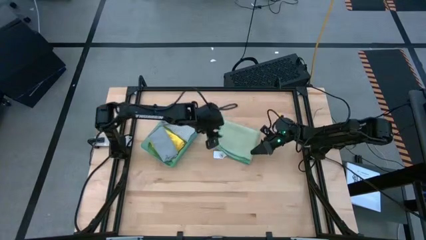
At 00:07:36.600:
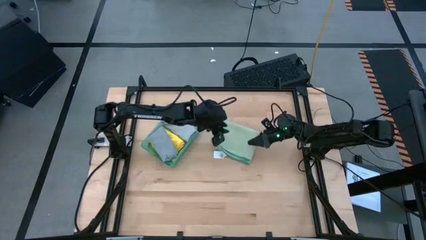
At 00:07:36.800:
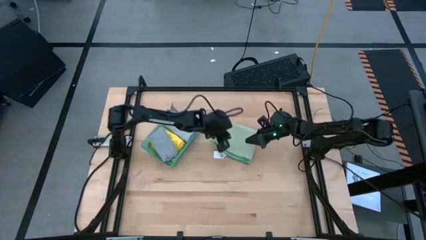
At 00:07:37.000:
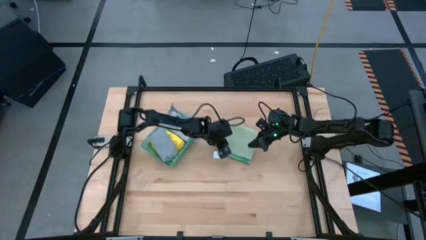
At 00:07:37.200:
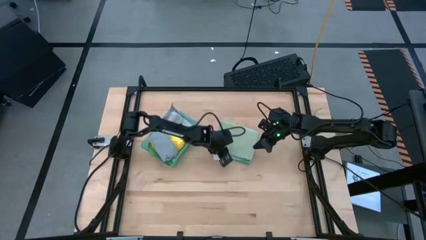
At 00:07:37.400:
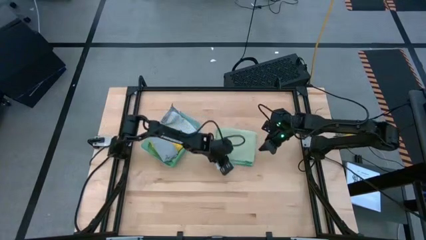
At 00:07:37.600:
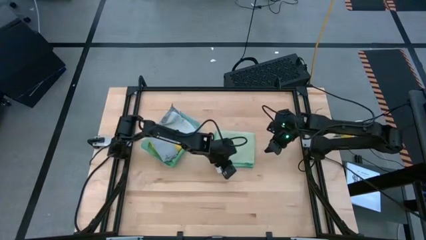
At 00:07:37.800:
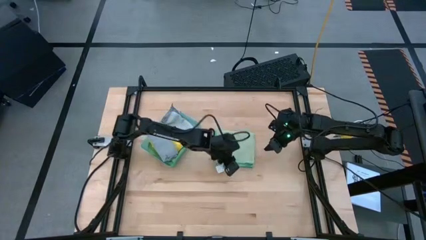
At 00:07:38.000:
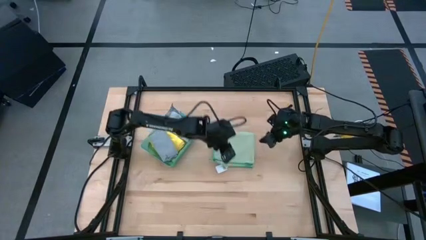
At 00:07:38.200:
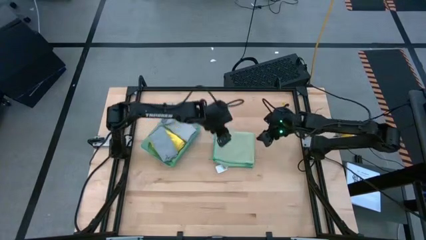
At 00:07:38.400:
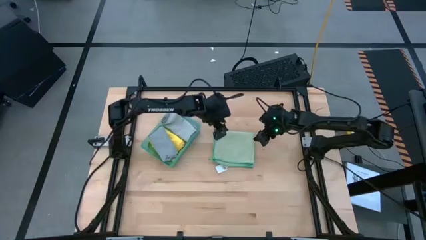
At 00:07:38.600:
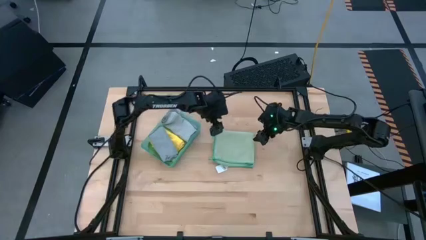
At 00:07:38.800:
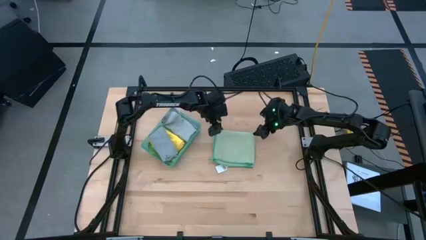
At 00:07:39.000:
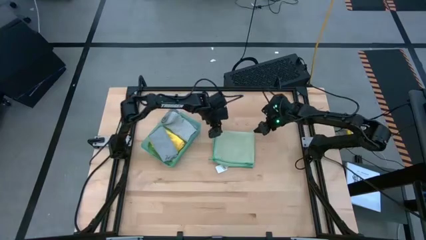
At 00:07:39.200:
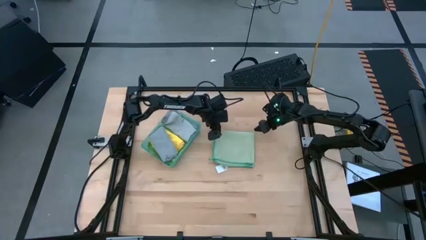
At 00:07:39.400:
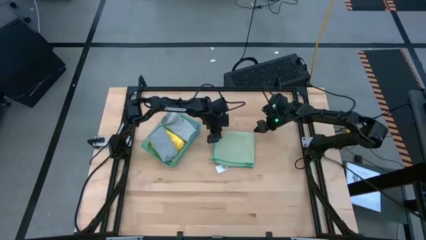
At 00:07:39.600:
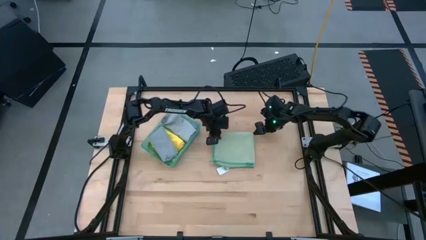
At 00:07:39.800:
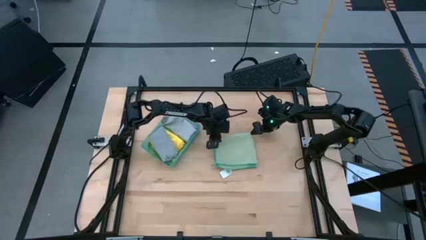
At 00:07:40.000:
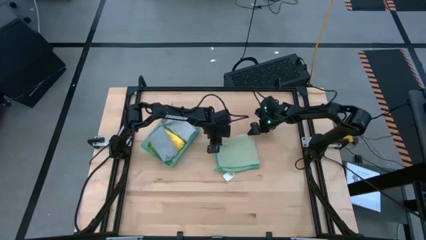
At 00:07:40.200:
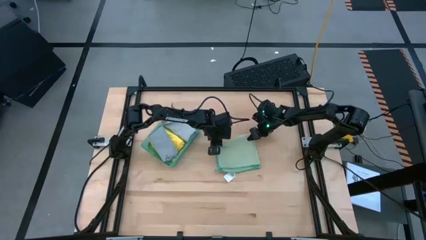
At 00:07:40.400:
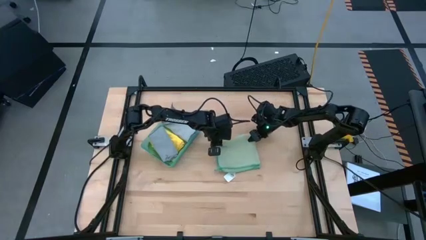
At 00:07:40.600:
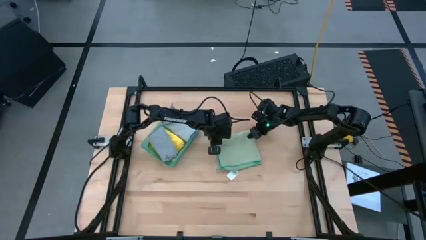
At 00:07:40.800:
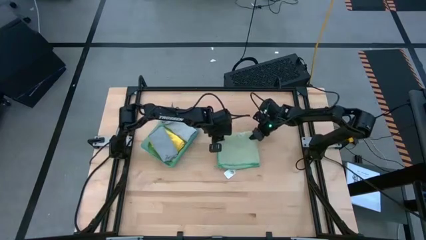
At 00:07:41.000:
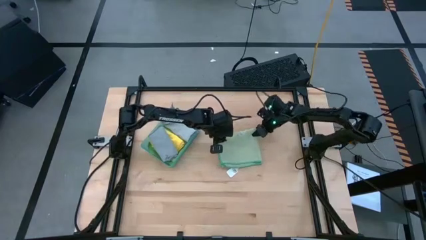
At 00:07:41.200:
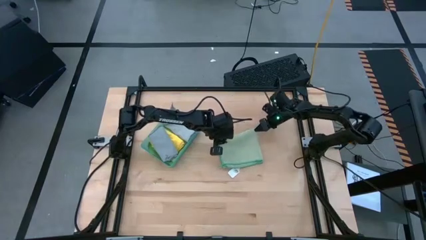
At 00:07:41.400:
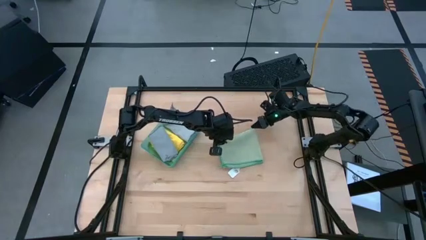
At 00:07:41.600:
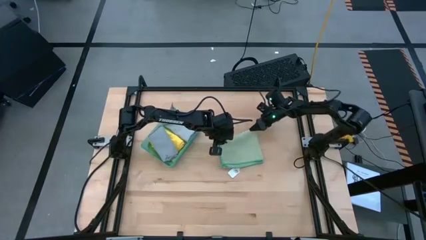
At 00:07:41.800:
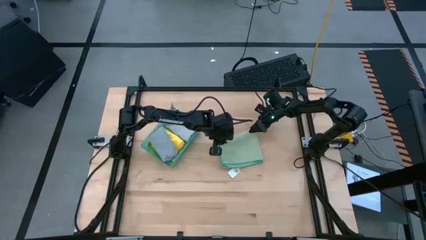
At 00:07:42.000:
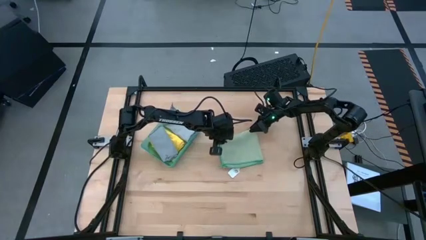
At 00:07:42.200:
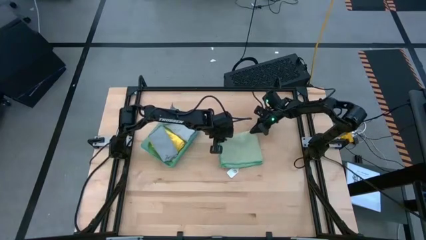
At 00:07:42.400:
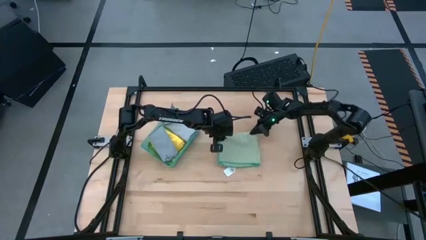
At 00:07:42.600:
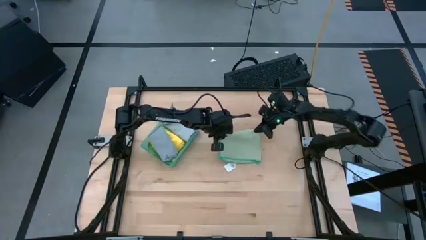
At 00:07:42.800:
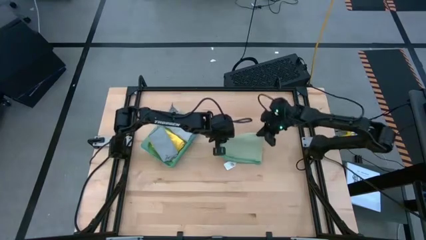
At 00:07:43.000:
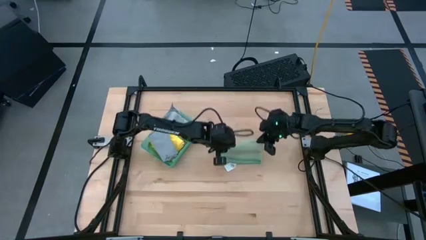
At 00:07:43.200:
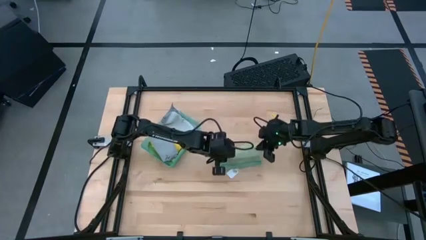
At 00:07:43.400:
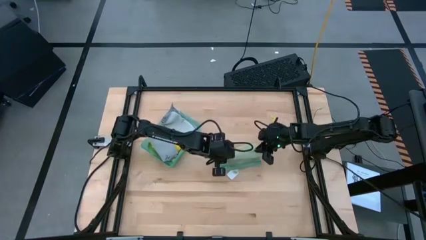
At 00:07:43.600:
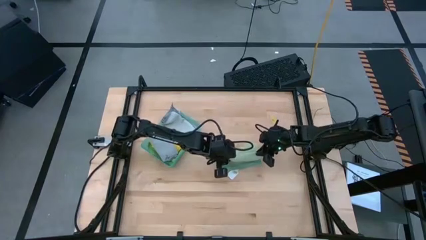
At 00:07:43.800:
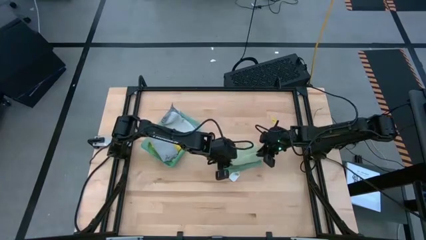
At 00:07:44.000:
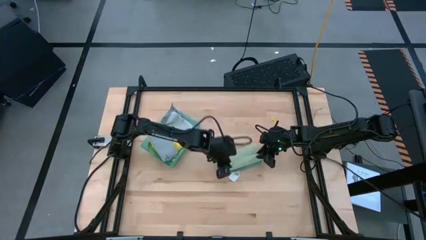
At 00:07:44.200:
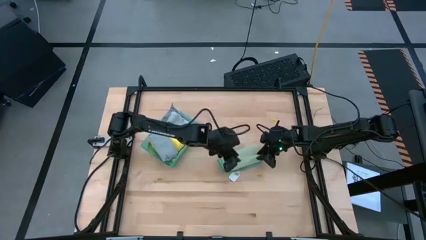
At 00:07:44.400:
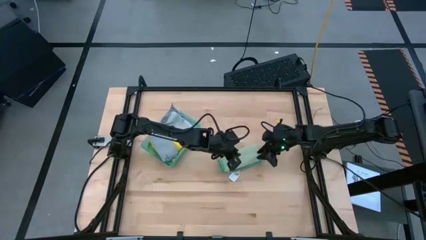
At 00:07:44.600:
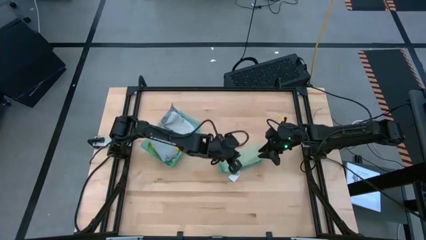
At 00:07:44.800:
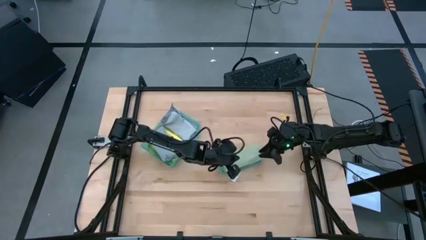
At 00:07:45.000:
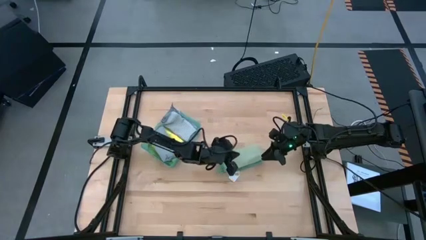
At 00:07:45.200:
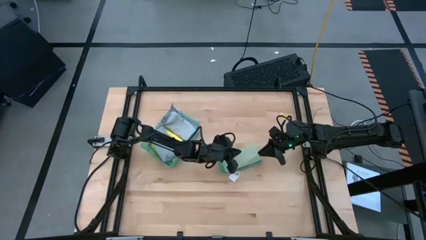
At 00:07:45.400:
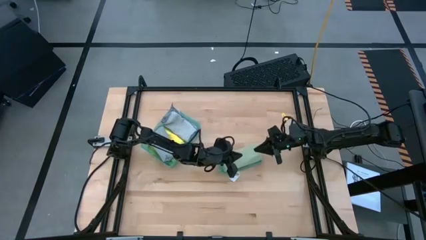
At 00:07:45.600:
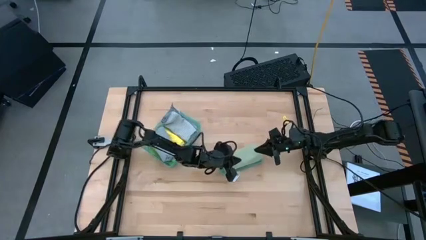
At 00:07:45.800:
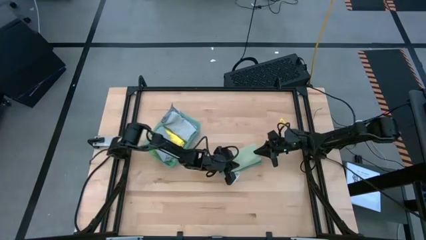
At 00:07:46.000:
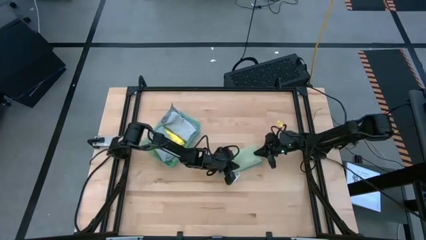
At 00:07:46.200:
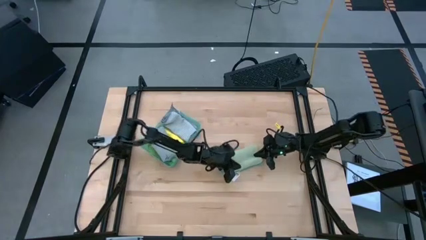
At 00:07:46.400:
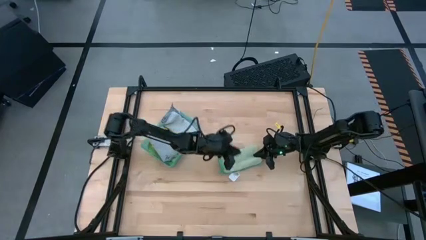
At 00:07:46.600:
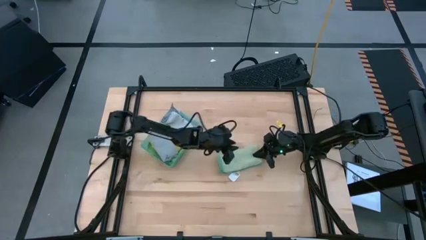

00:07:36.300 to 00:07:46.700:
Task: Fold microfiber towels
Fold the light green microfiber cloth

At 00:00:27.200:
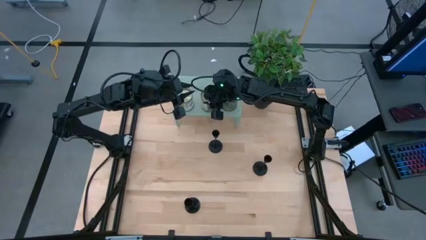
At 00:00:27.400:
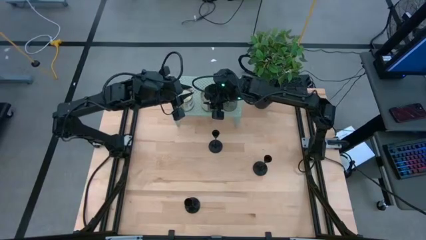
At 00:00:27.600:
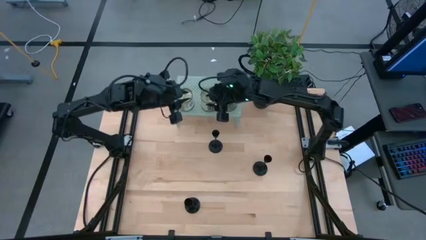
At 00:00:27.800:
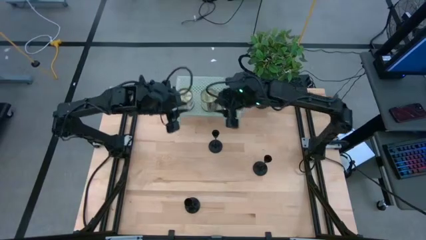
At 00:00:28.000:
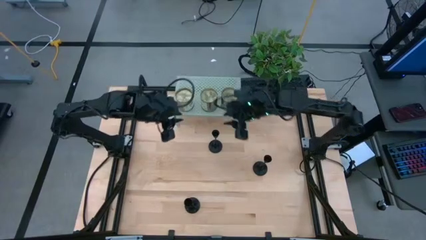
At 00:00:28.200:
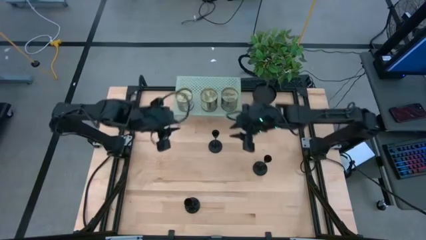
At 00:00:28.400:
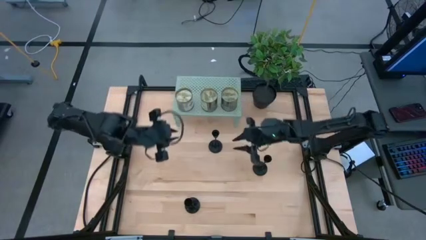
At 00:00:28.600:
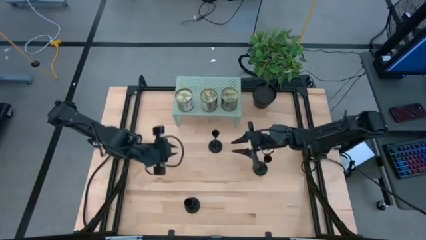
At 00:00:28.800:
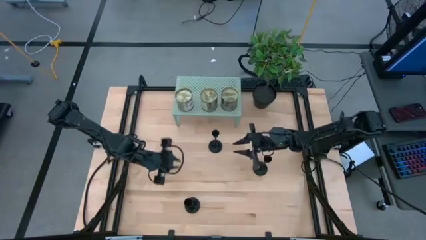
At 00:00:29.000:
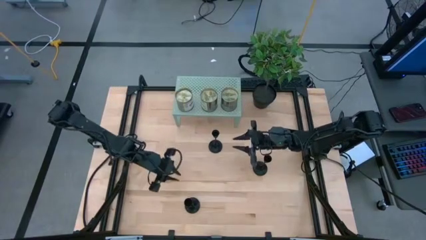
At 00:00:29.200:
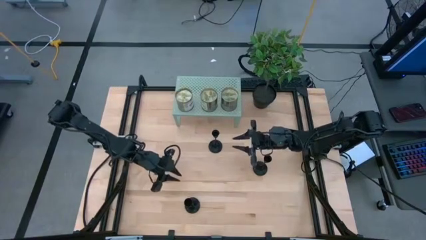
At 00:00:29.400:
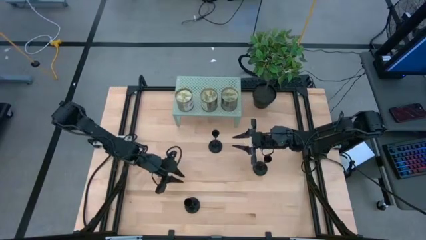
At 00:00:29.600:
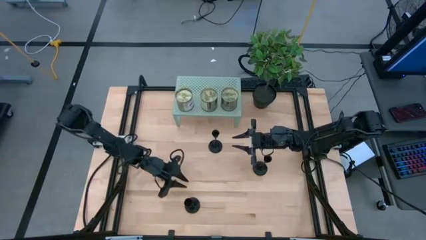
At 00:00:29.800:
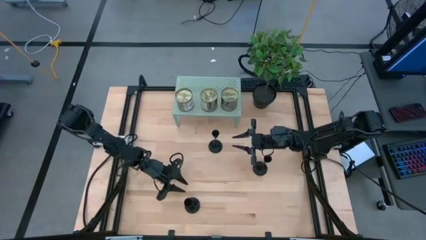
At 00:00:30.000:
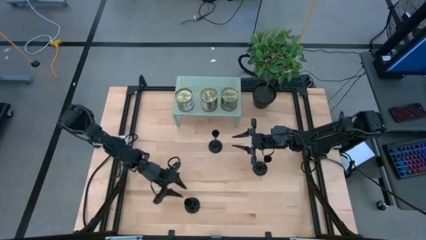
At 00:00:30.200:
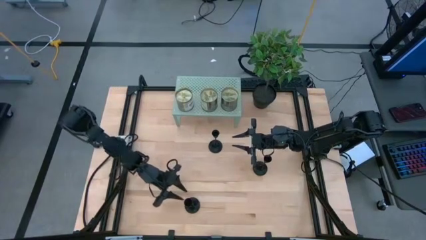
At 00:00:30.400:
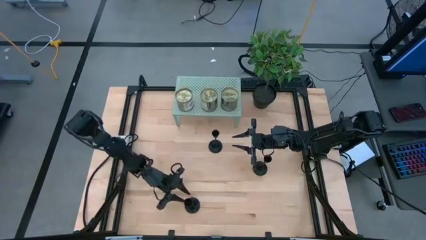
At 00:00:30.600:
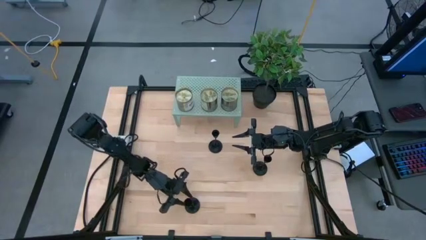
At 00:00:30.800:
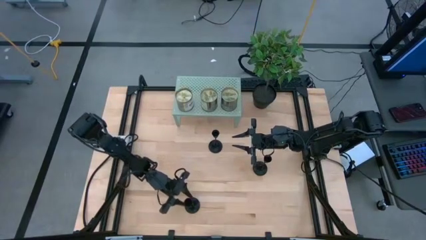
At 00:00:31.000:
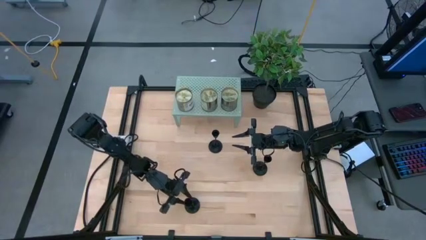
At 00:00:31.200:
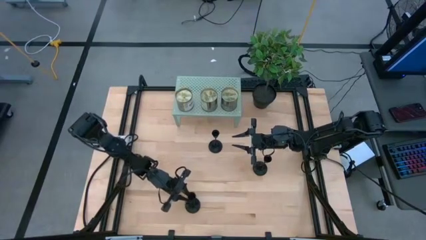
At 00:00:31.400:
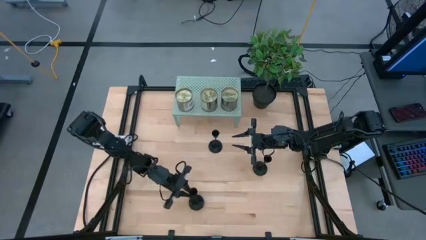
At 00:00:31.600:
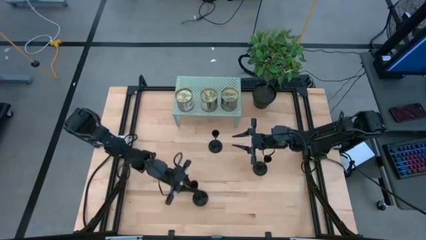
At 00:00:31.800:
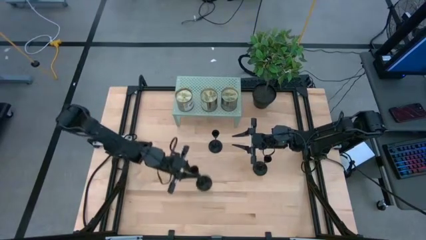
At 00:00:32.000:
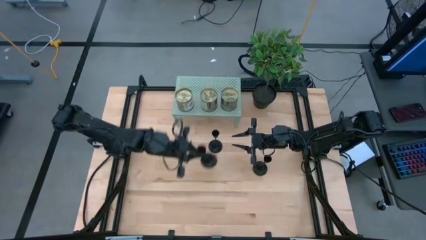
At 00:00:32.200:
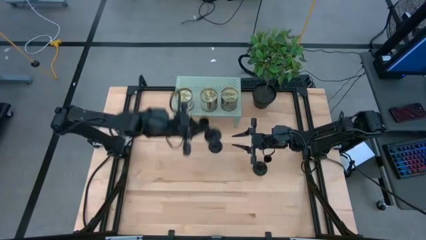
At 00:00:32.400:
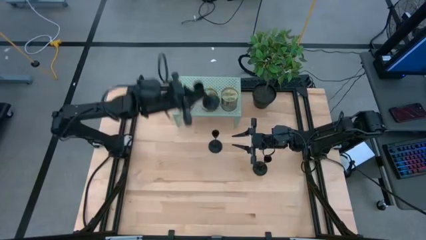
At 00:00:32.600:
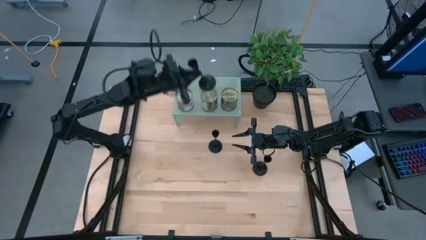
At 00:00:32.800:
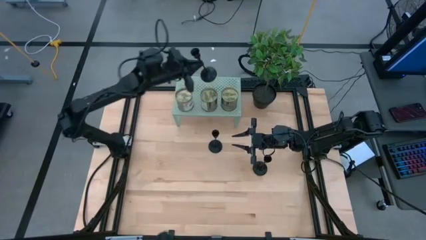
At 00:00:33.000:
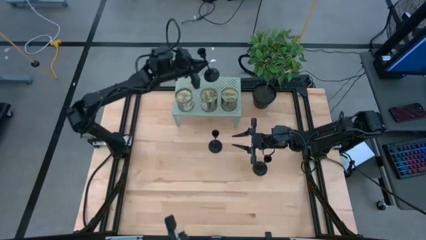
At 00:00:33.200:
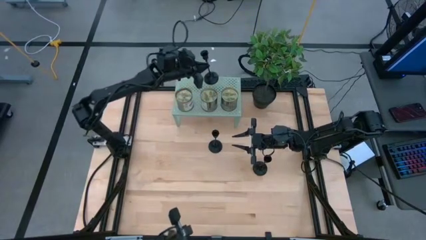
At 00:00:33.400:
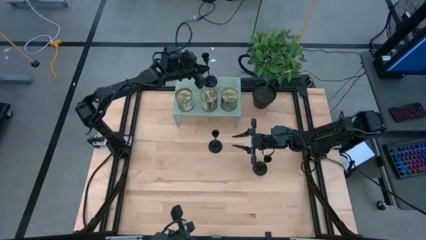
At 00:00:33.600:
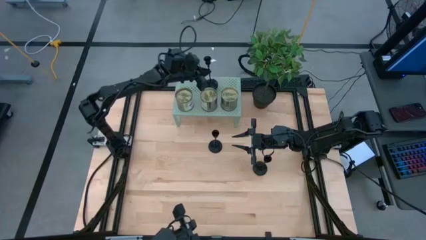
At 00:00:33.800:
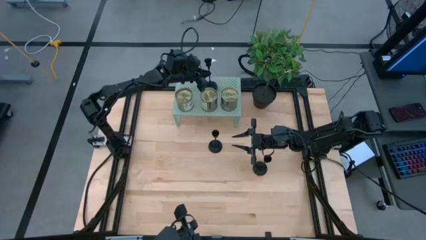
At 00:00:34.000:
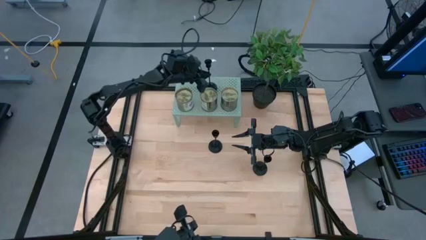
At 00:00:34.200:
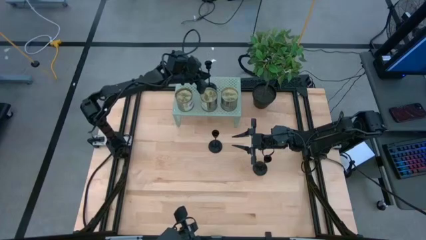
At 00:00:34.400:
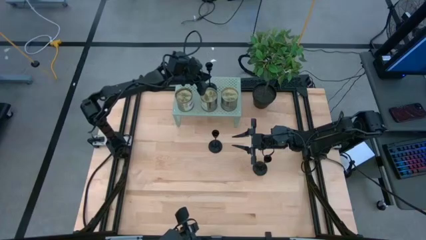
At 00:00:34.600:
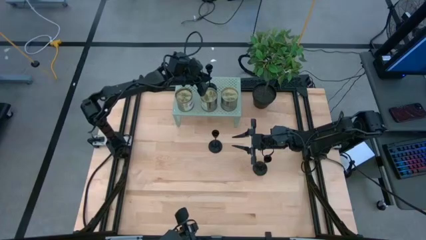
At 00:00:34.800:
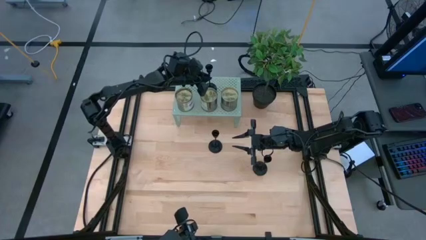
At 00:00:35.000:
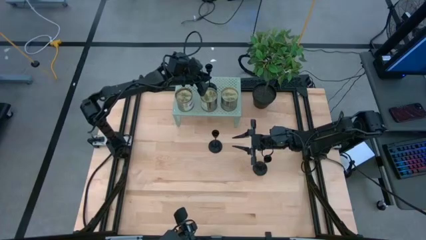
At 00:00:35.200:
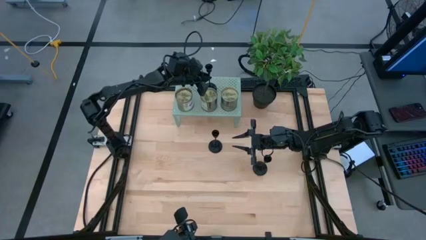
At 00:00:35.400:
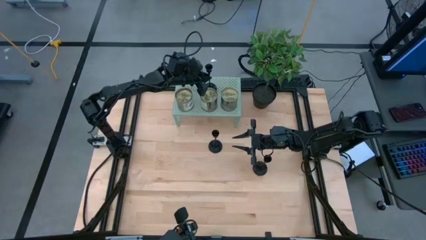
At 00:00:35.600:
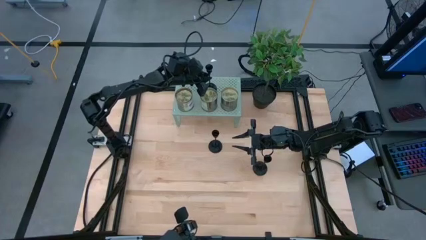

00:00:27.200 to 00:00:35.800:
Task: Pick & Place candle stick holders
Put the bottom black candle holder on the shelf
